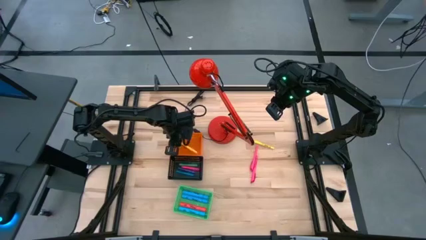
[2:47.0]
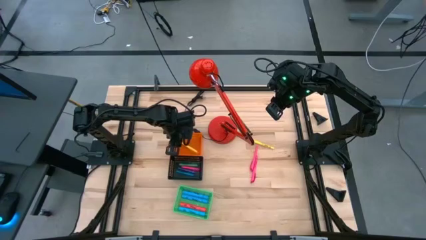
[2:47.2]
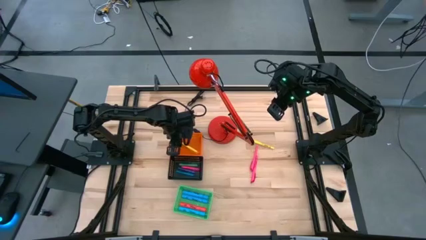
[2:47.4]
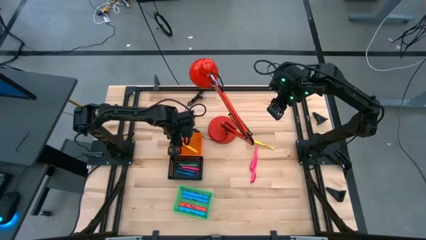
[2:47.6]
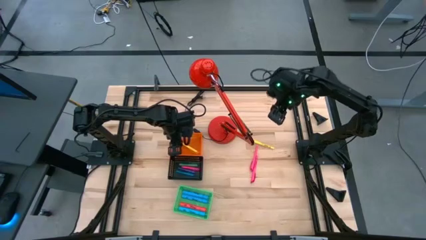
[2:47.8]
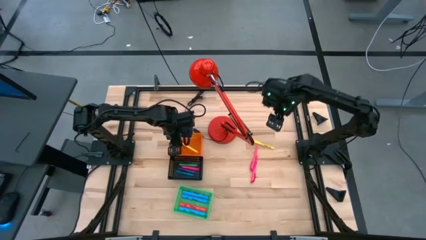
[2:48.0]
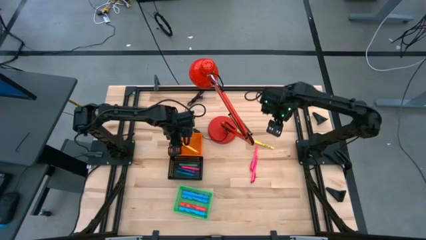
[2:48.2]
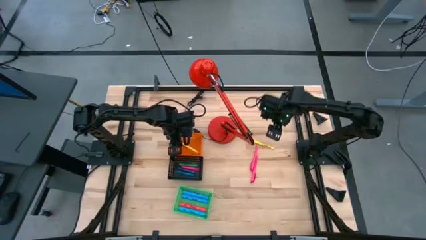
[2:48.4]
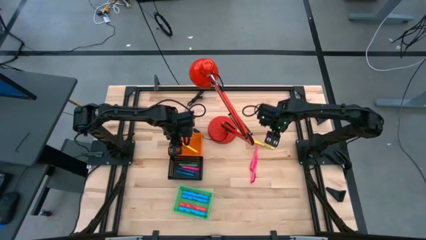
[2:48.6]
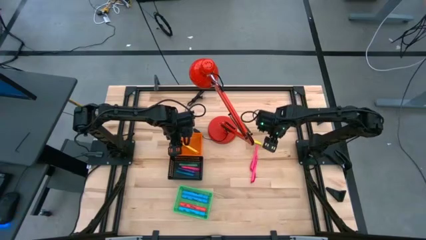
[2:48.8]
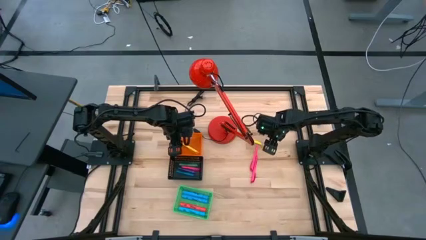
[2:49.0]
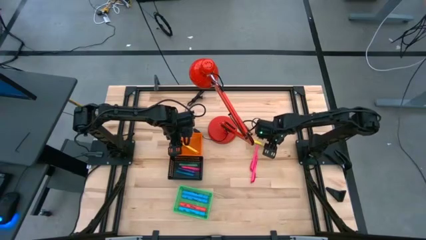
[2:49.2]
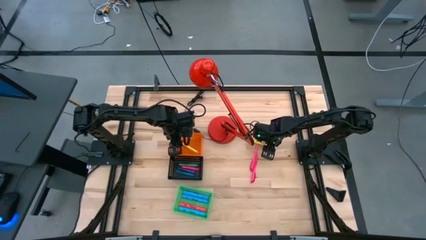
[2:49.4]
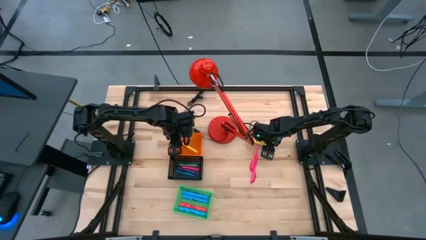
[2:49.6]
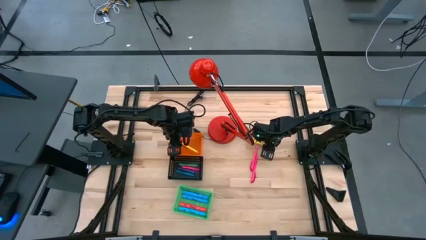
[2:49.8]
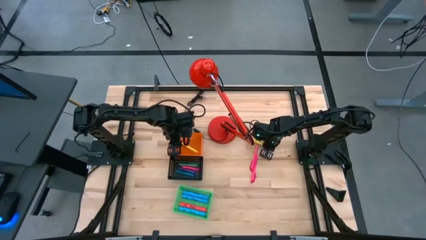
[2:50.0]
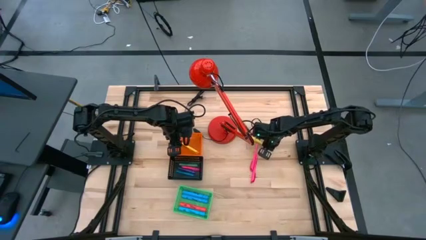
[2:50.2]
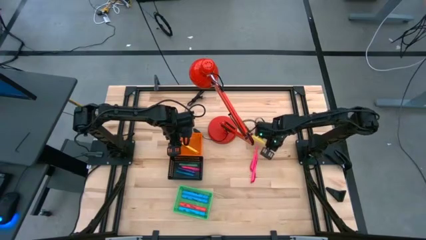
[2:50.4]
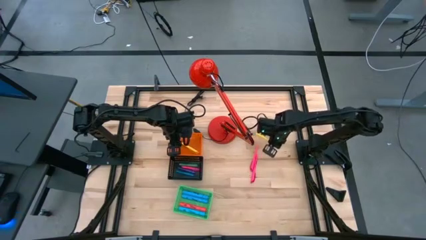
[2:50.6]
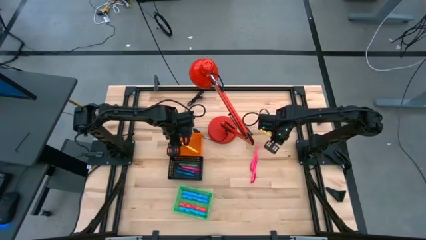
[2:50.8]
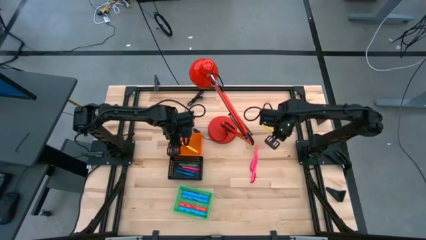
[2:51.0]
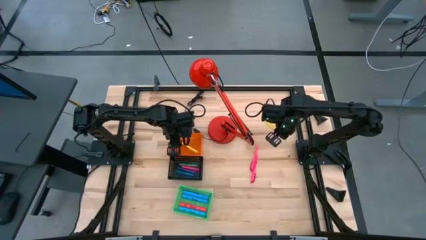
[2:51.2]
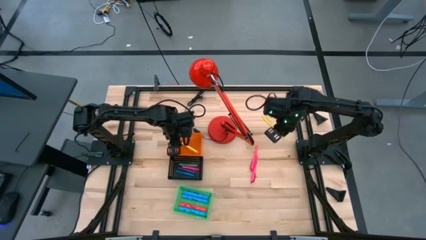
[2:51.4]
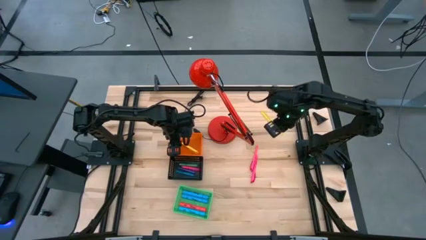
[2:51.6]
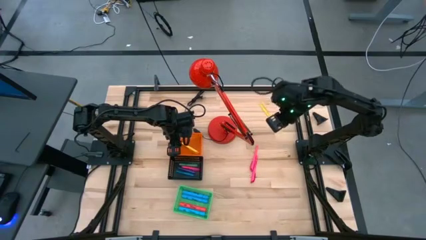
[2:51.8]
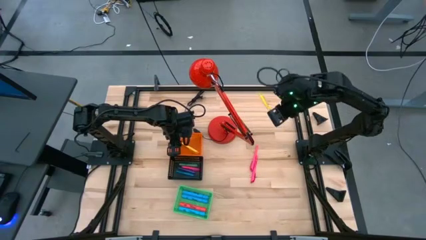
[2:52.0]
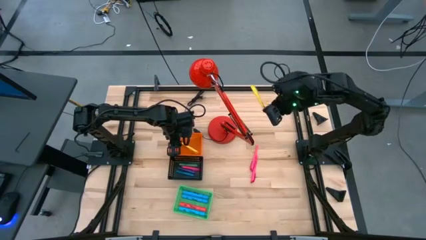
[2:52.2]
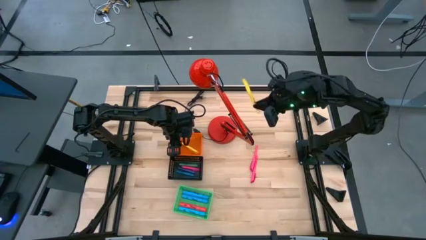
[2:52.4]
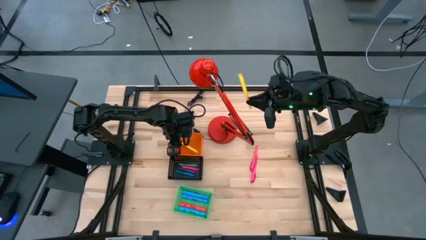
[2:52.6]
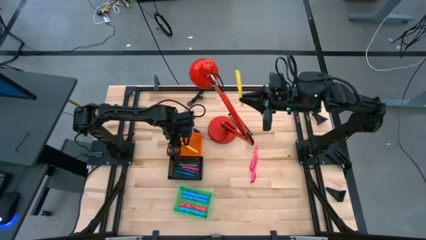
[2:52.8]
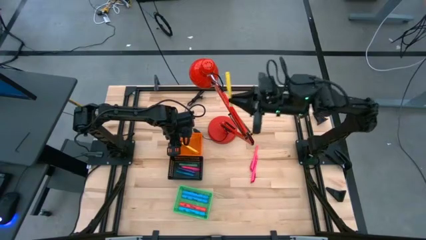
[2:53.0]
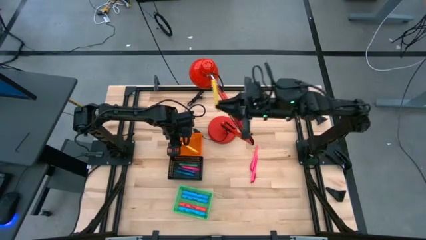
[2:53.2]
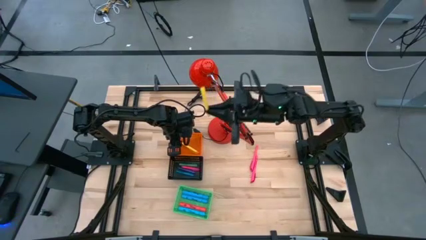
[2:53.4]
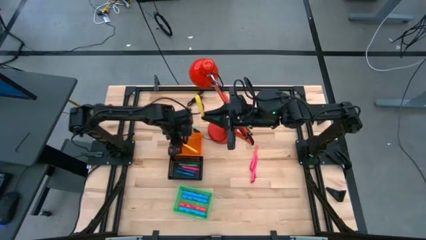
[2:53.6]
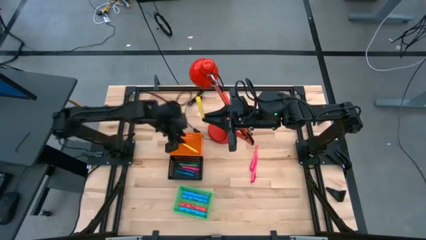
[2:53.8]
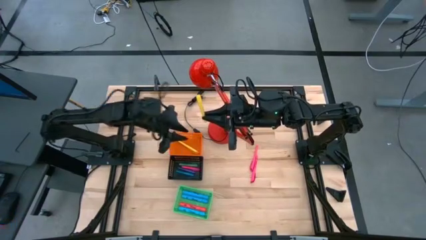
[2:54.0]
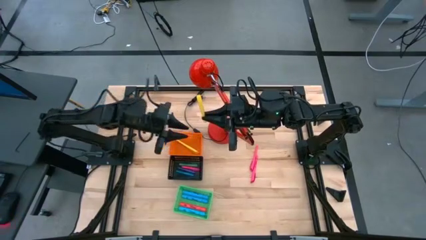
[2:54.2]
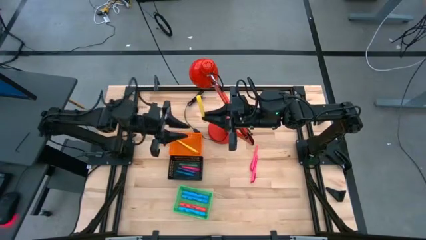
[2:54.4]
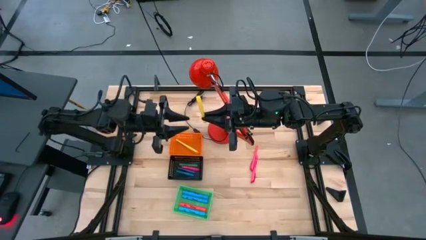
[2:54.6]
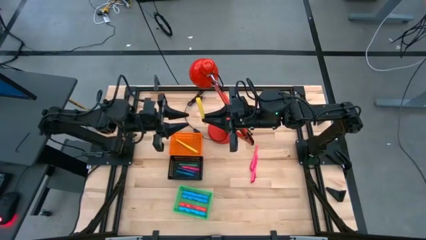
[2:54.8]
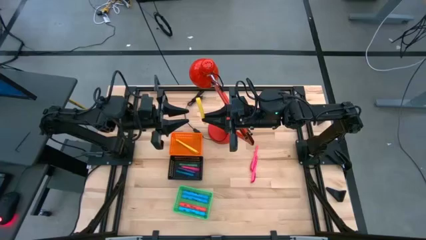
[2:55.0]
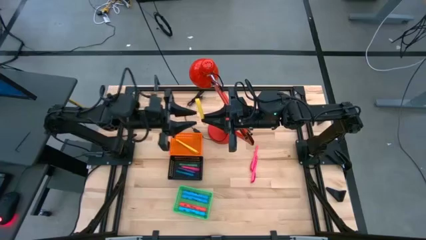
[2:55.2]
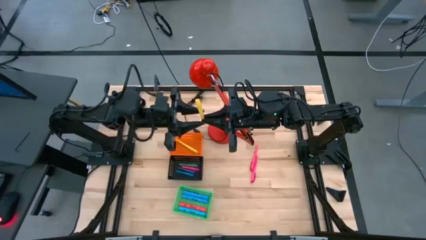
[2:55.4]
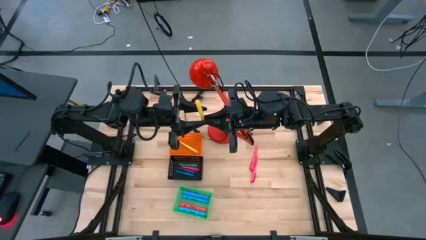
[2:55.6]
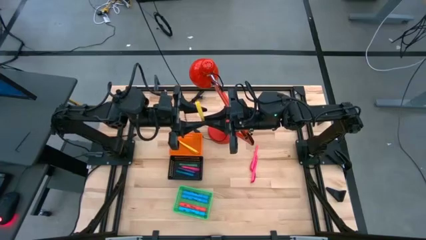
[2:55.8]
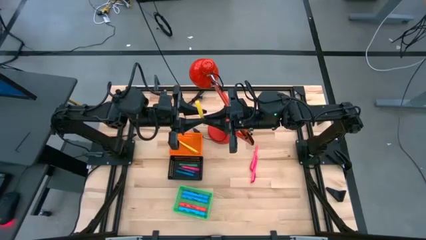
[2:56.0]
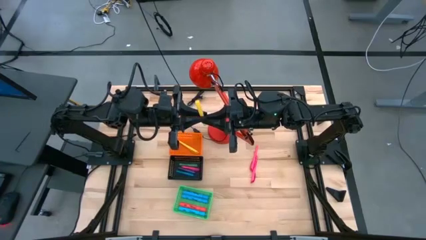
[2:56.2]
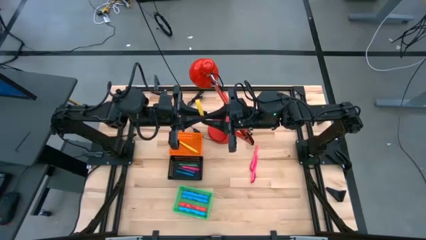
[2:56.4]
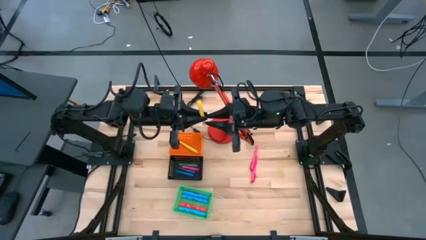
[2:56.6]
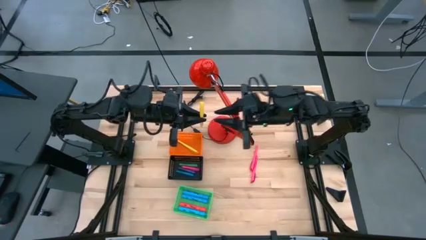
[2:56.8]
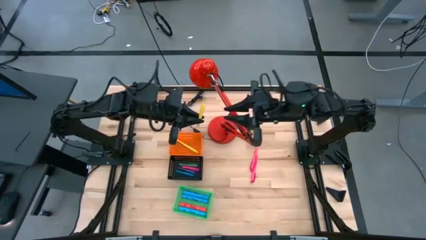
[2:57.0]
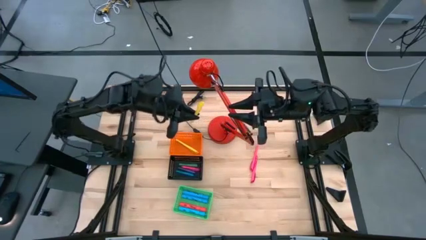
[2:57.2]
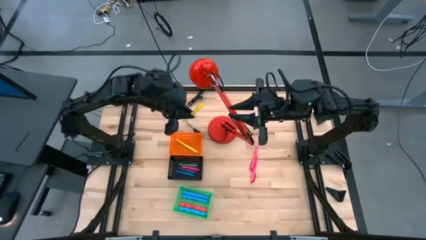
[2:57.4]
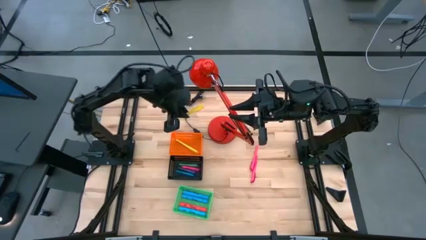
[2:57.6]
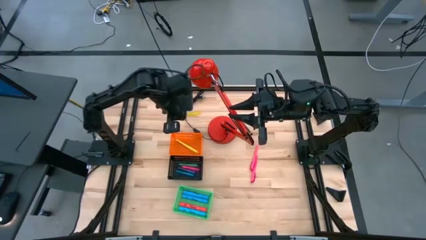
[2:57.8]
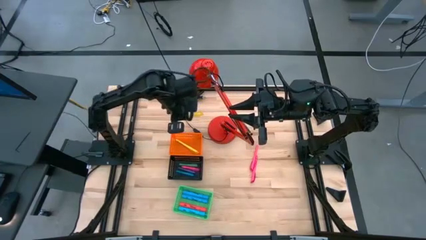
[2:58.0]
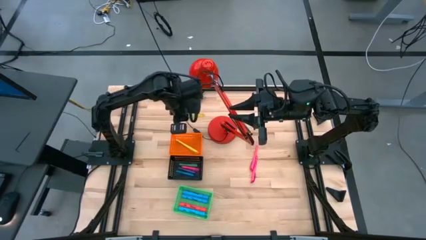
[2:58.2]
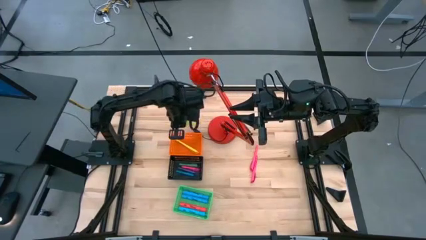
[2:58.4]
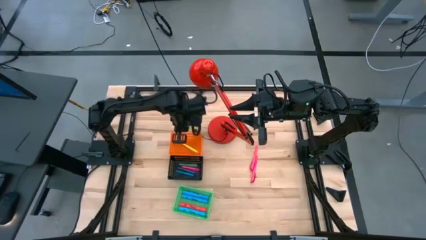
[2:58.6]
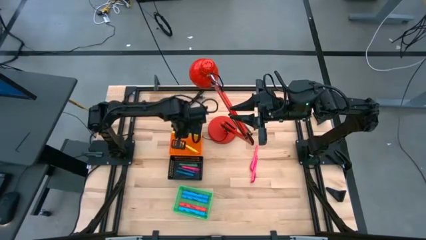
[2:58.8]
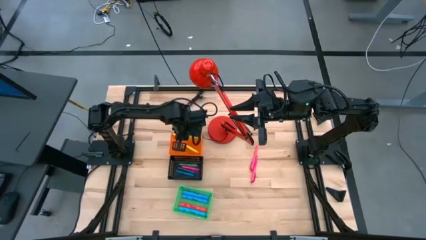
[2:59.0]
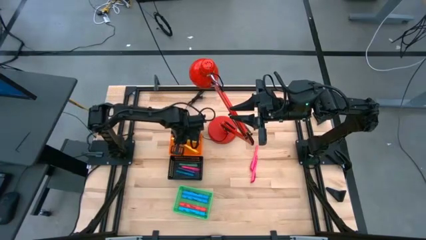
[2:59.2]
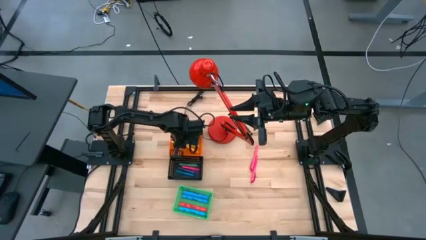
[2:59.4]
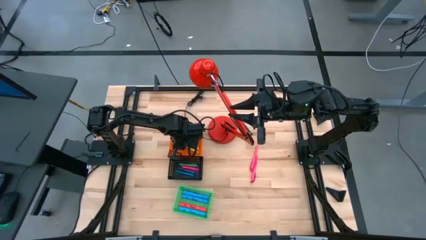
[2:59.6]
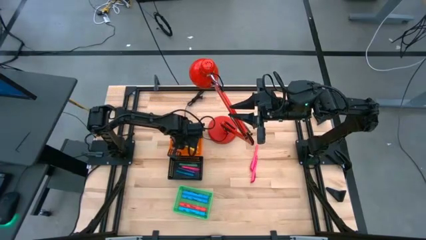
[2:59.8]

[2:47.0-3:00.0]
Task: Pick & Place Markers
Put the yellow pen into the orange bin
